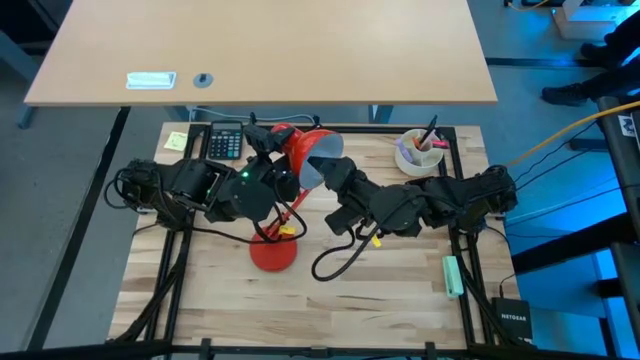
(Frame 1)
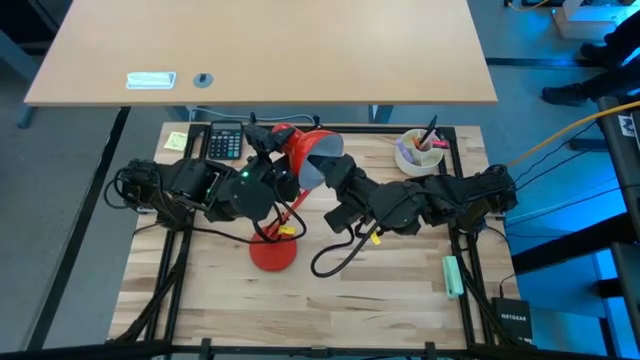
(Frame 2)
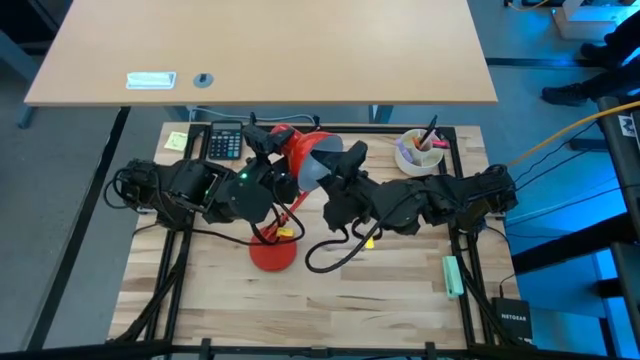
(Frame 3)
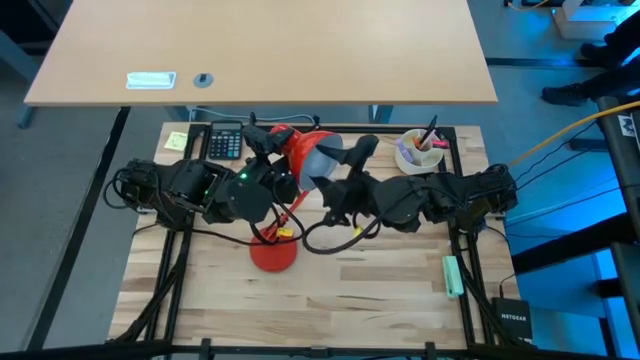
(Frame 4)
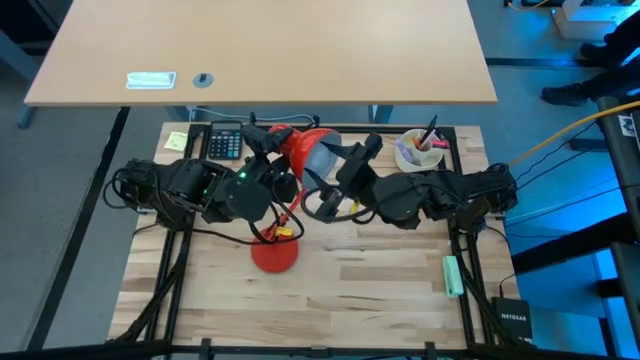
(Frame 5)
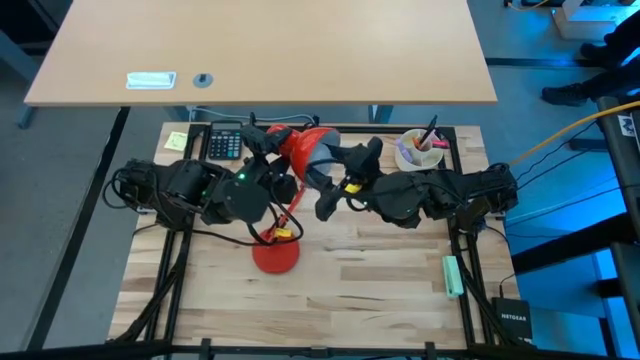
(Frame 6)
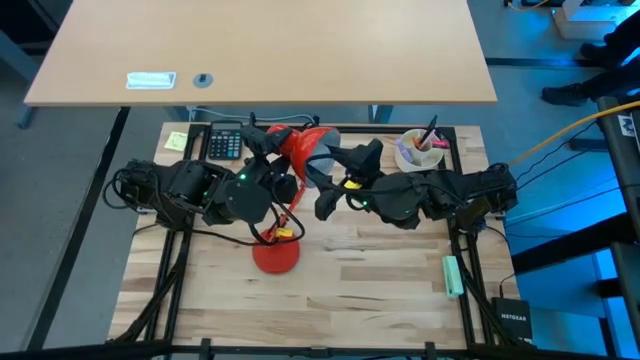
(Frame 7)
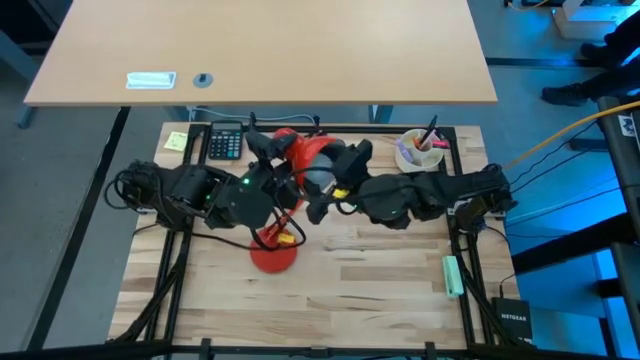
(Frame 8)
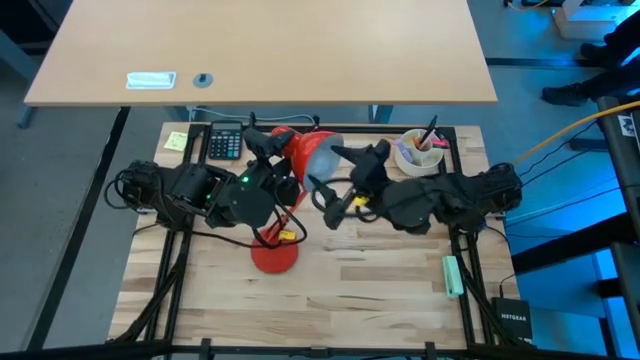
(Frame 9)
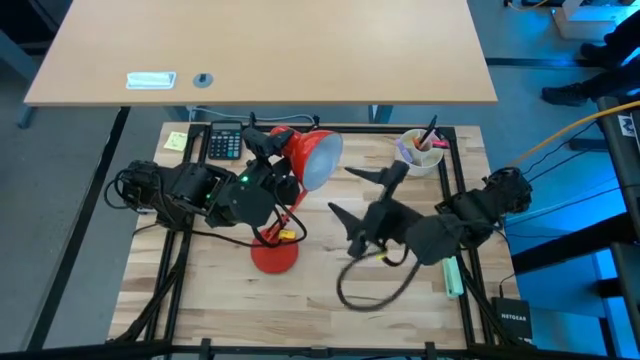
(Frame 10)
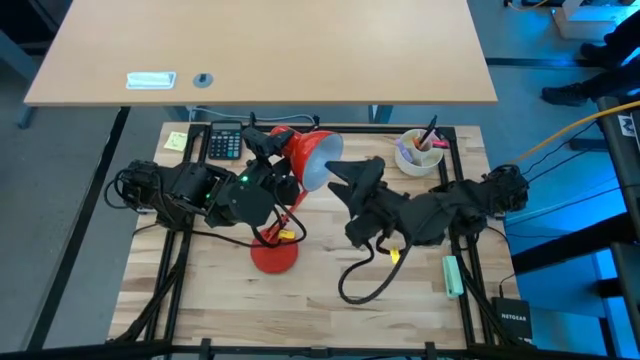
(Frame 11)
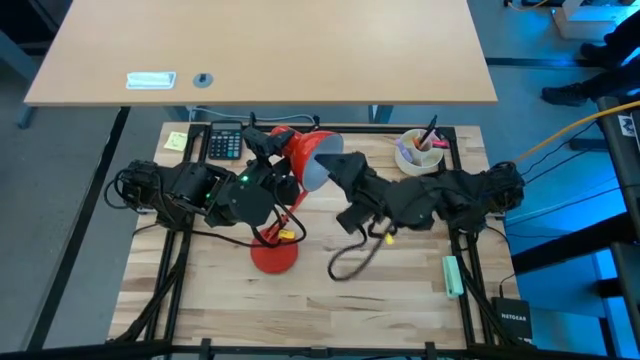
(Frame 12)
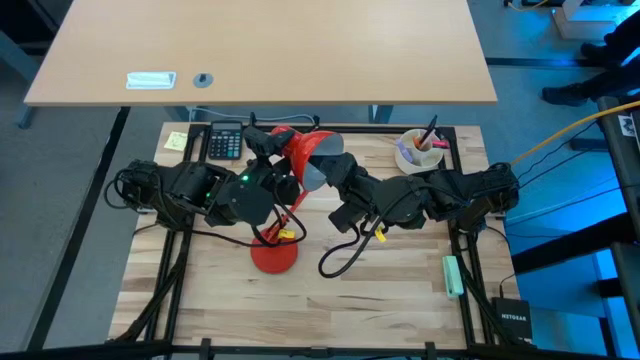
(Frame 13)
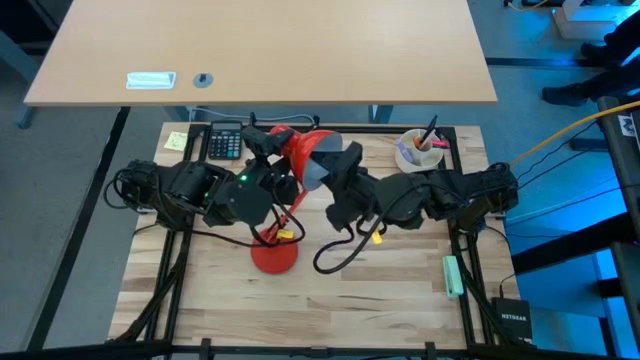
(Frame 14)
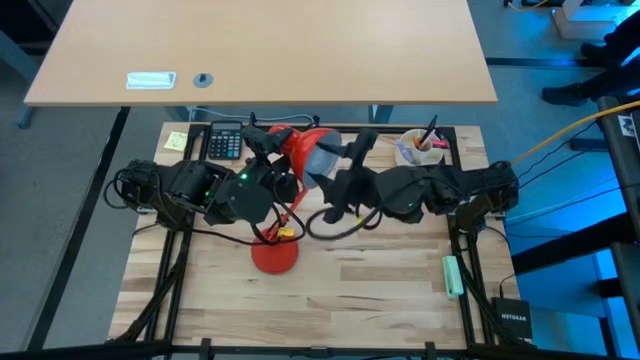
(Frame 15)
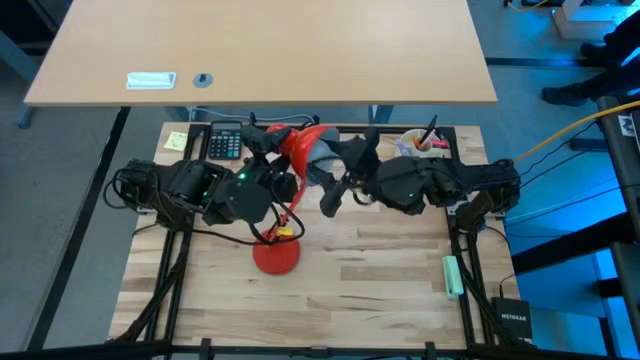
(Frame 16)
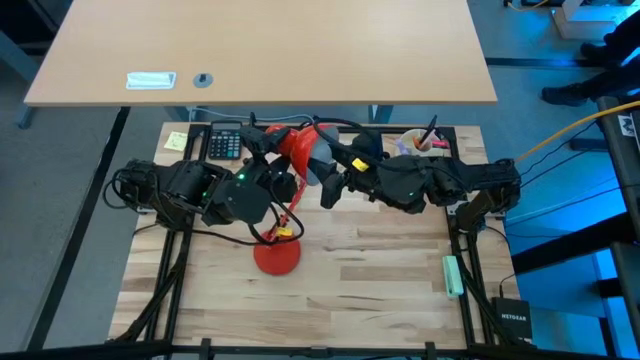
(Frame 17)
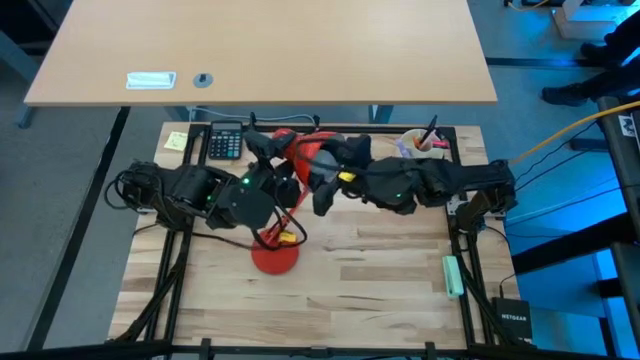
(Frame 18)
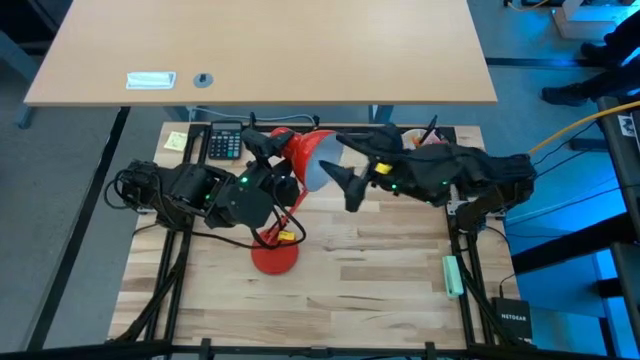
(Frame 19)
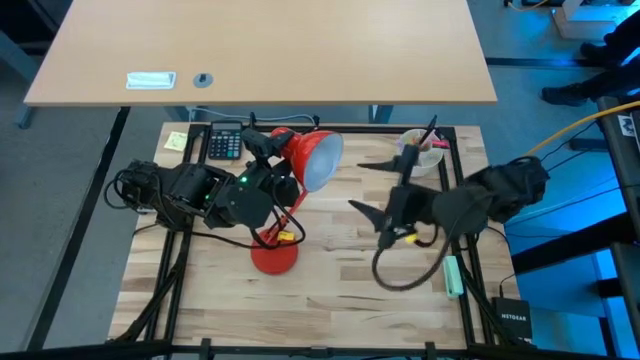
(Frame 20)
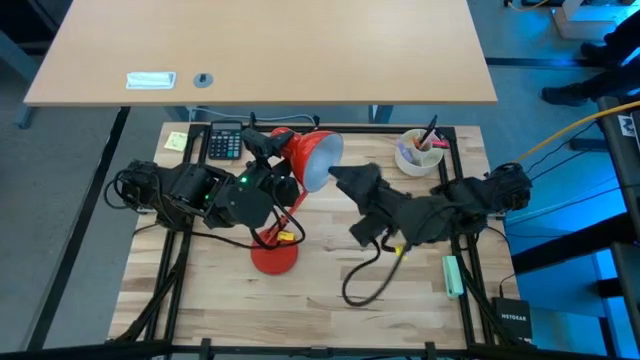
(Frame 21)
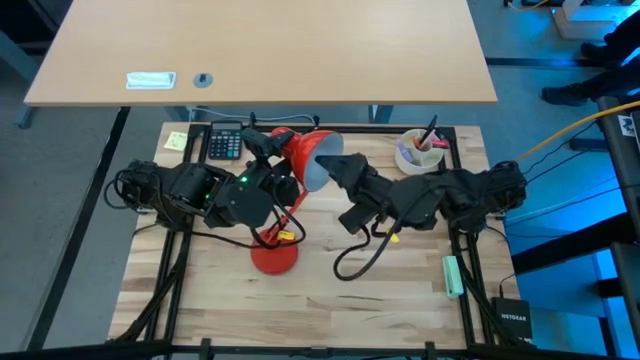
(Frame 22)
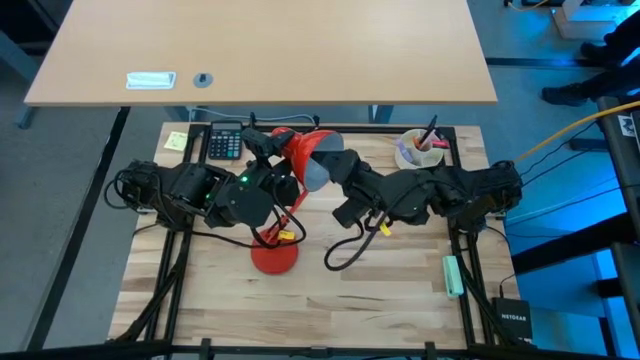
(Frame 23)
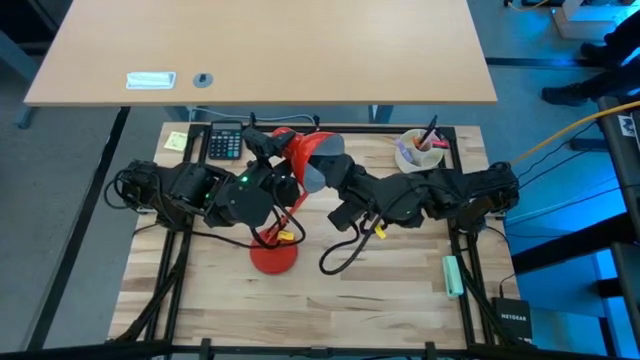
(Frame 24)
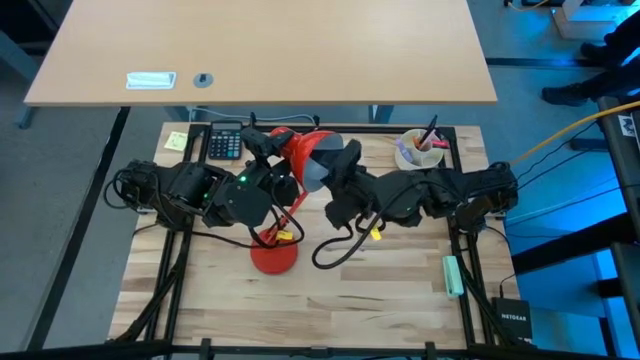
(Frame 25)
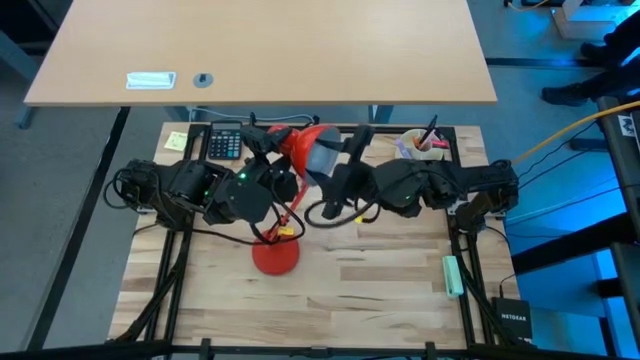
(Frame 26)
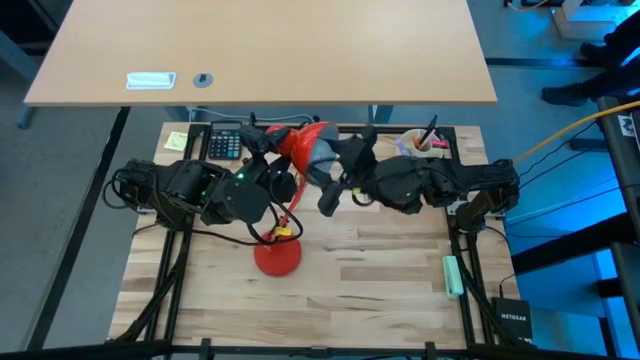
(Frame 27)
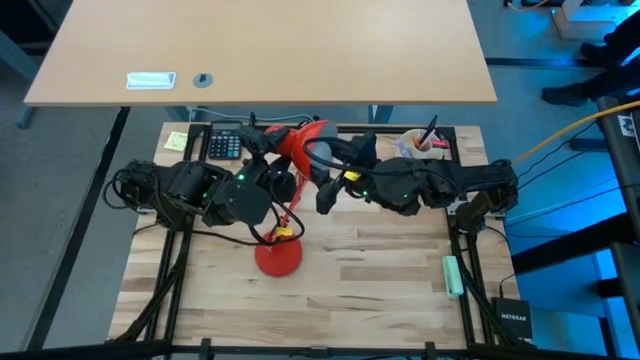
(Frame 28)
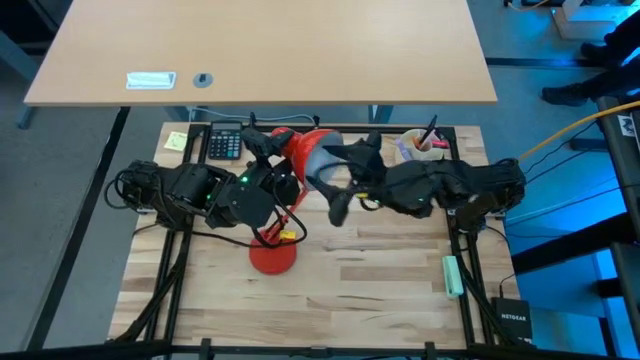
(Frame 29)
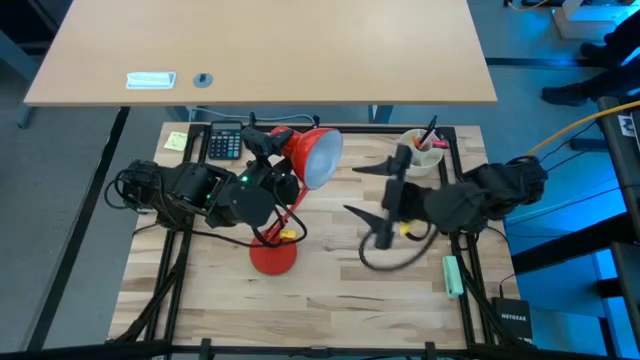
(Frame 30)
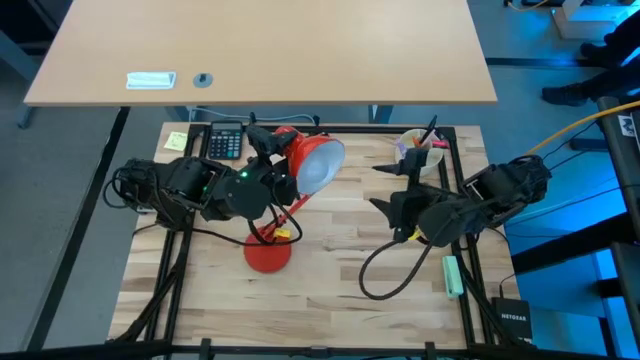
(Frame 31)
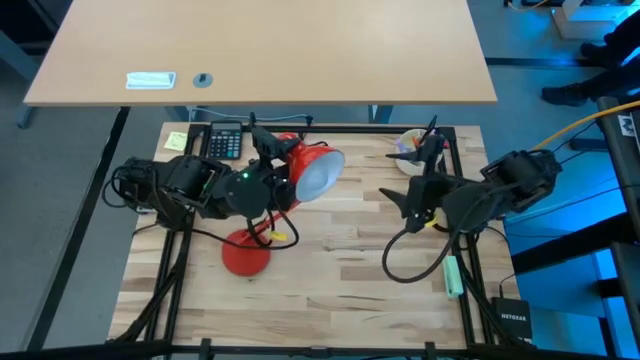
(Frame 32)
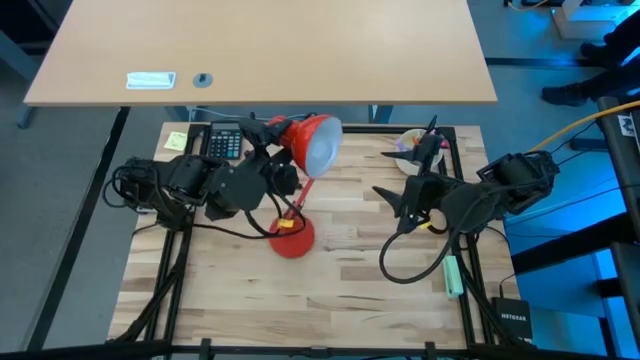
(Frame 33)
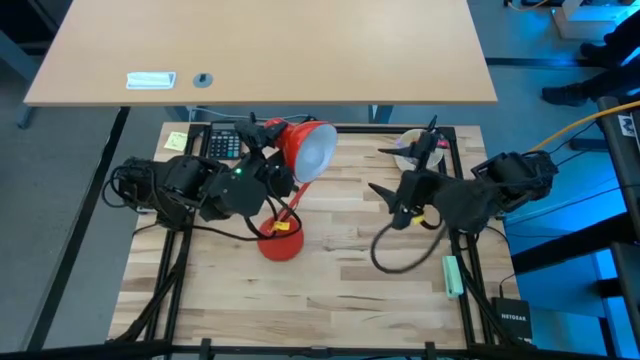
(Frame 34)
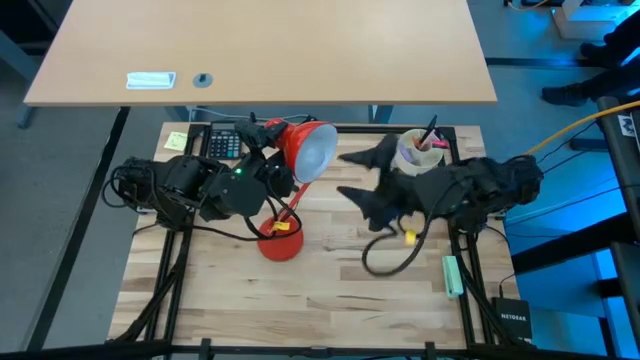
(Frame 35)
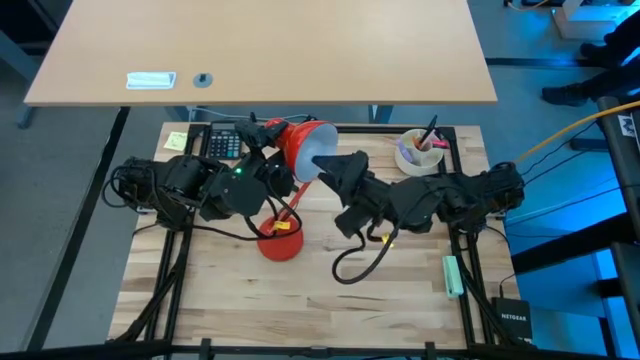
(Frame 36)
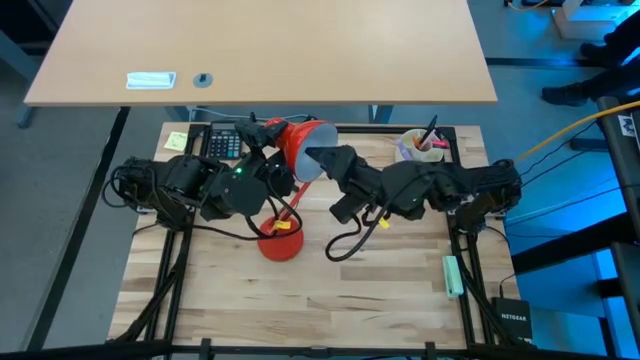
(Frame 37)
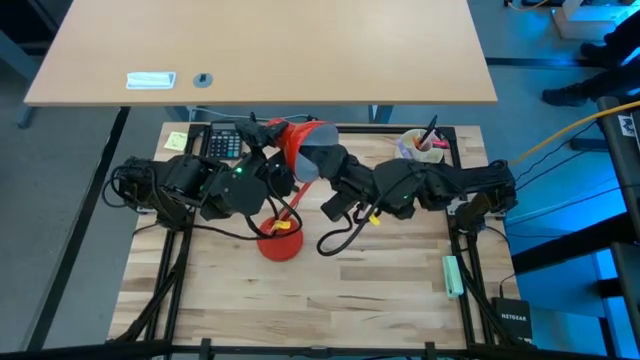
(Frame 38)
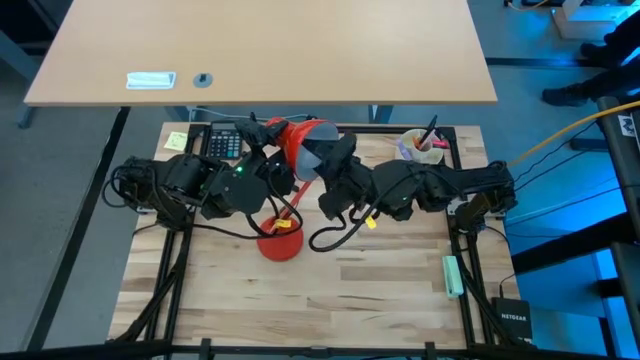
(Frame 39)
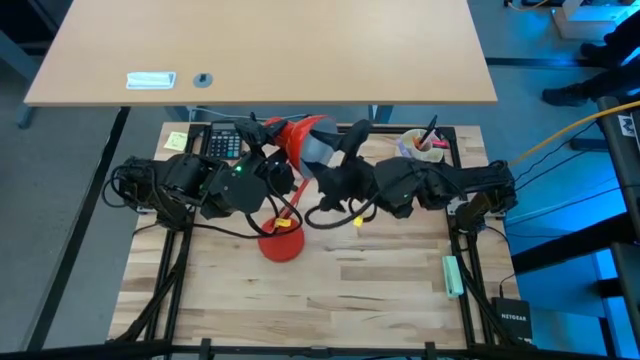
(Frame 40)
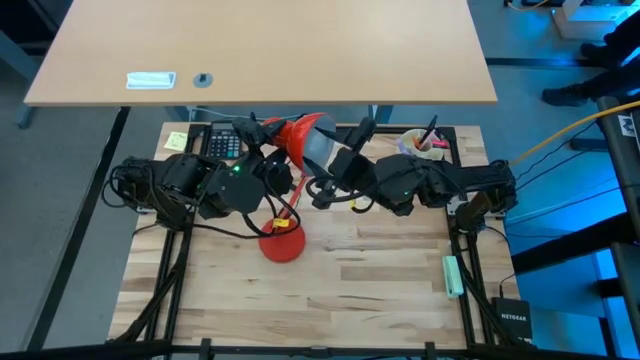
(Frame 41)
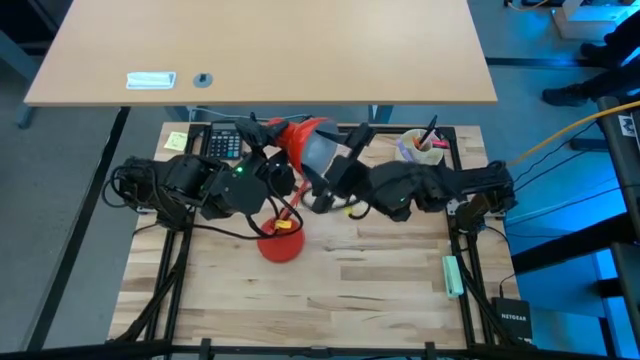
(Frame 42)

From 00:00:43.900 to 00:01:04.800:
Task: Screw lightbulb
Insert the light bulb into the lamp
